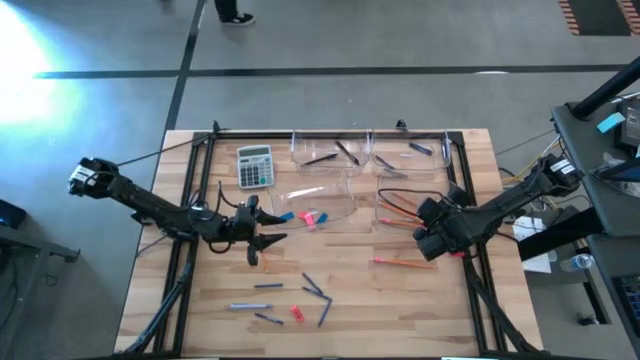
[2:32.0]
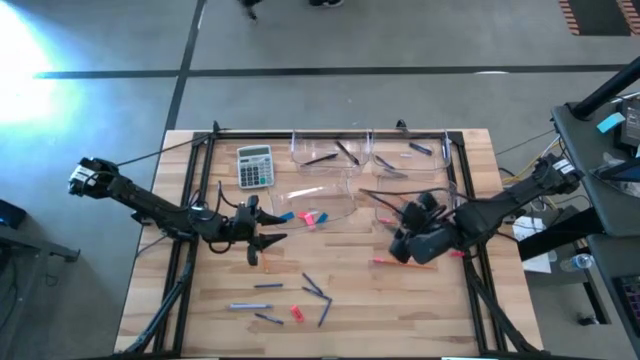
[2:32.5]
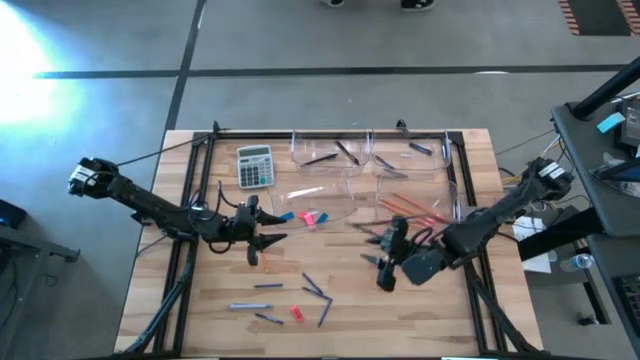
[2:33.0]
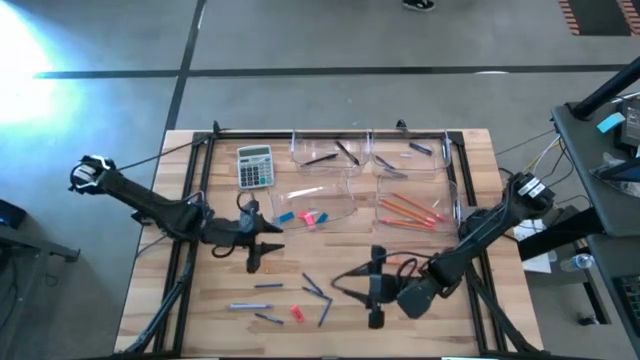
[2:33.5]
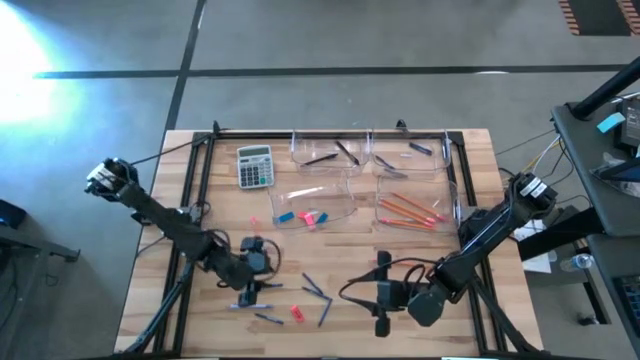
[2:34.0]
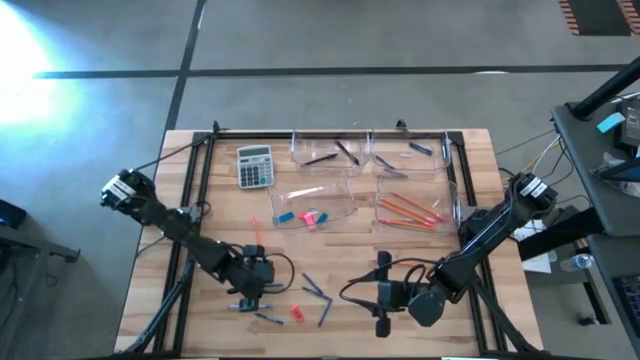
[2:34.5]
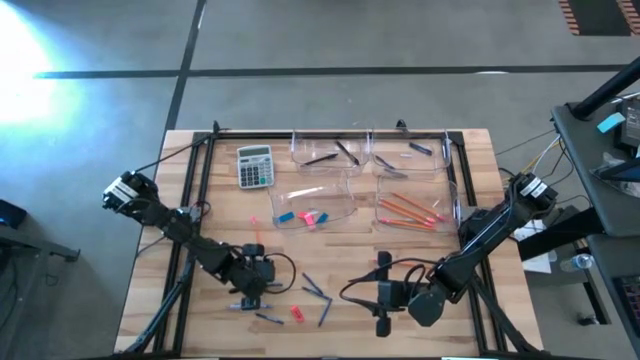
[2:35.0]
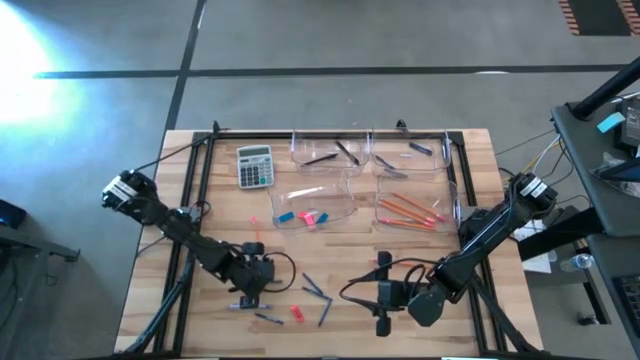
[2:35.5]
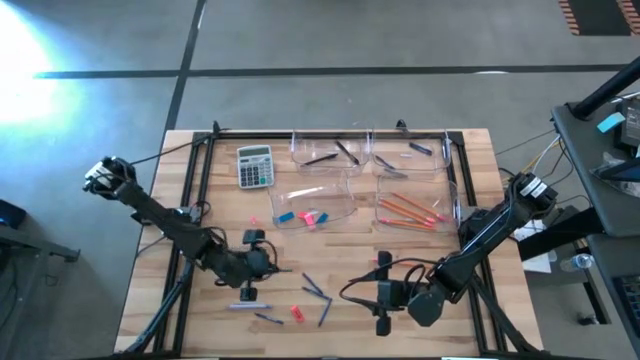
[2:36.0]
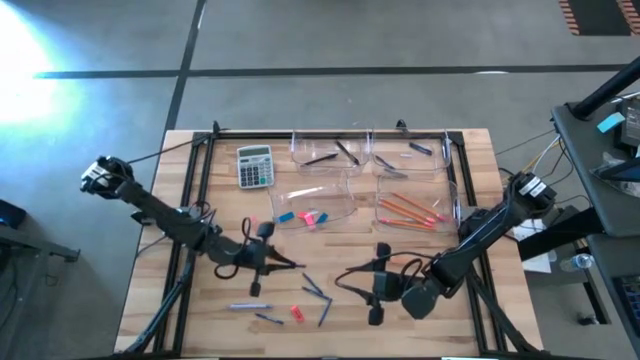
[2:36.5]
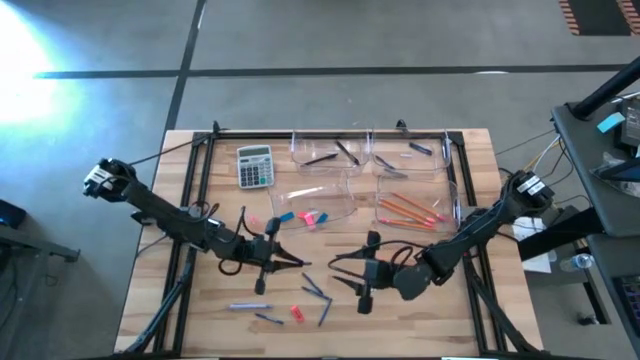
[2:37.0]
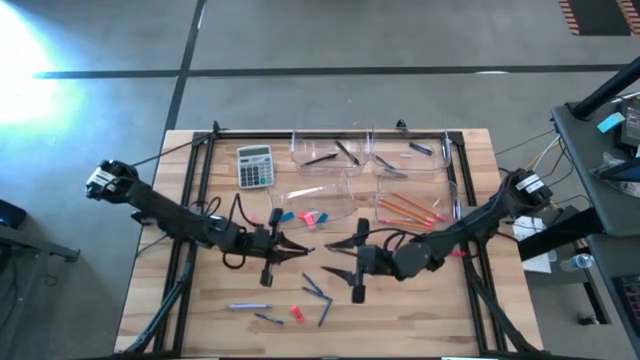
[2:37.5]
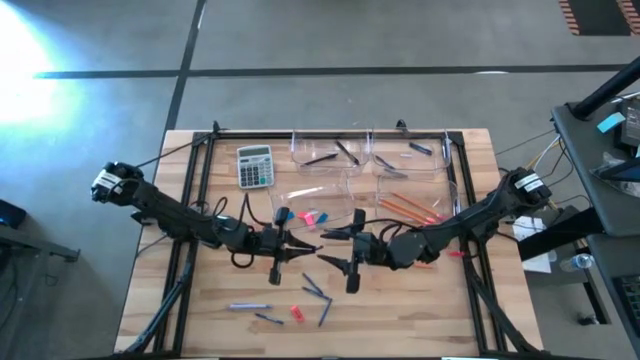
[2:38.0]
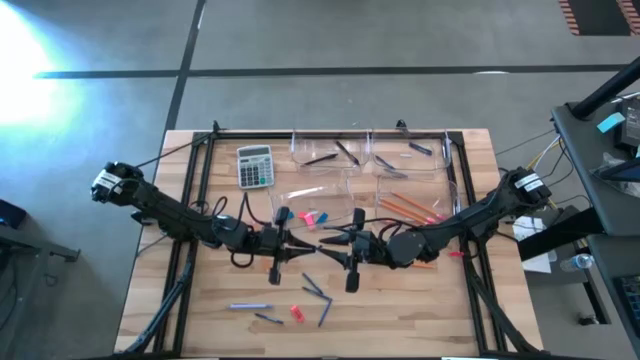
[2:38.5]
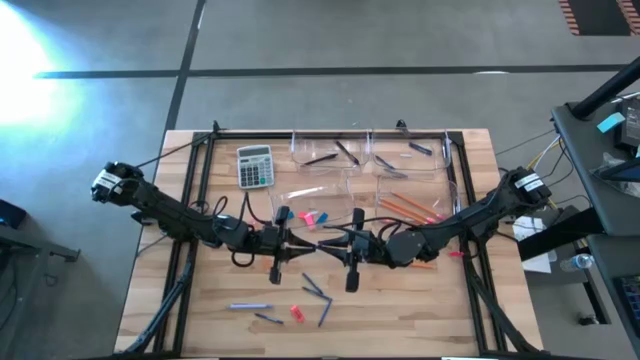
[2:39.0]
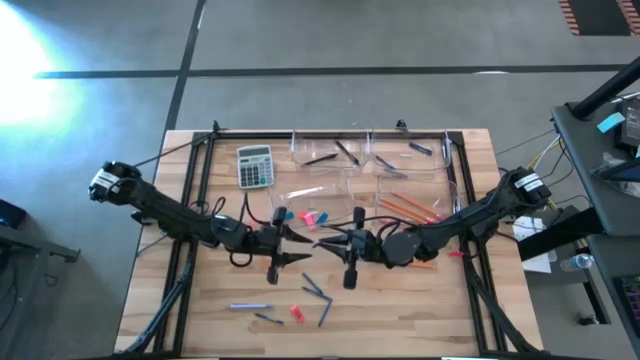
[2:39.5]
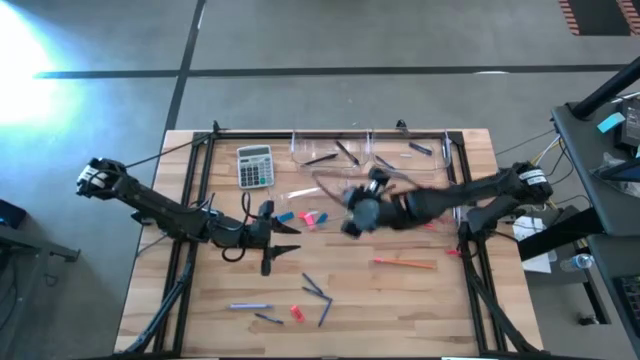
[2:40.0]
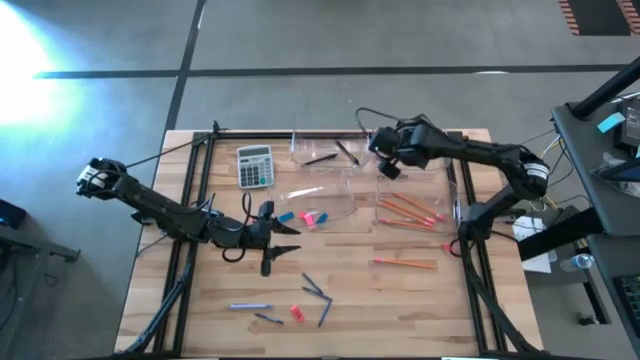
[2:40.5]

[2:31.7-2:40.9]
Task: Sort crayons/erasers/pens/pencils in bins
Put the blue crayon into the top right transparent bin

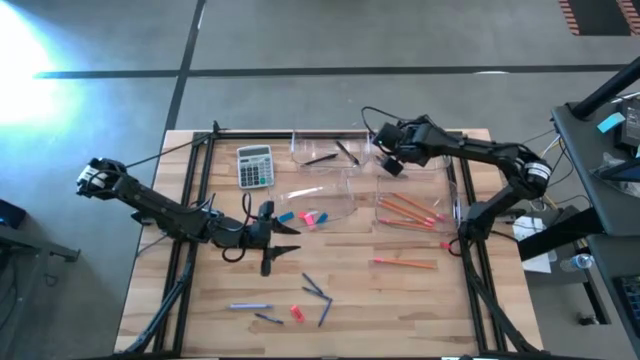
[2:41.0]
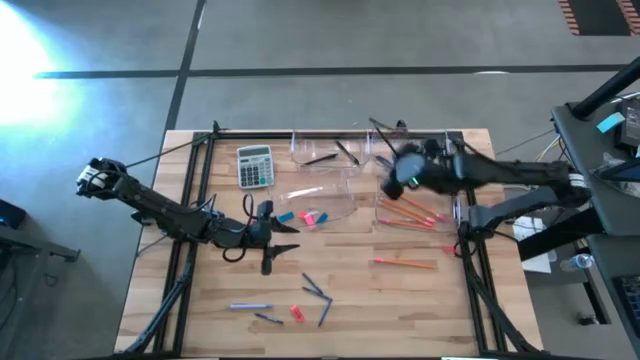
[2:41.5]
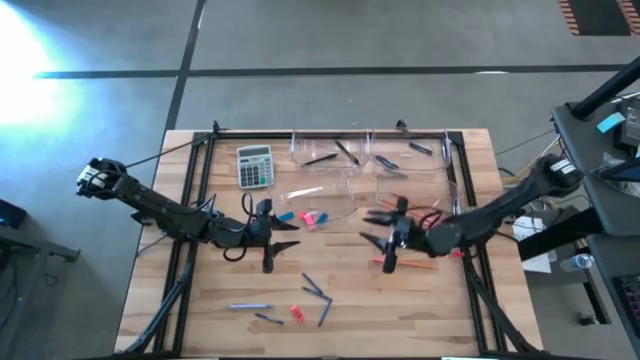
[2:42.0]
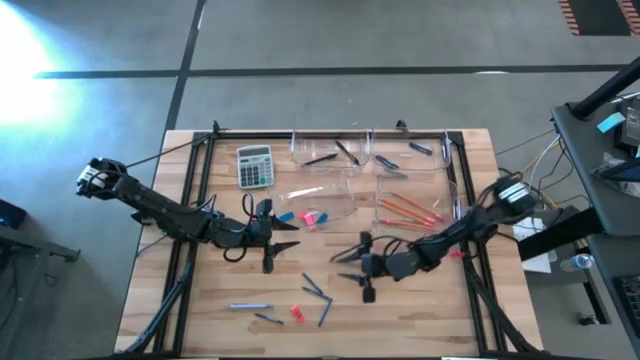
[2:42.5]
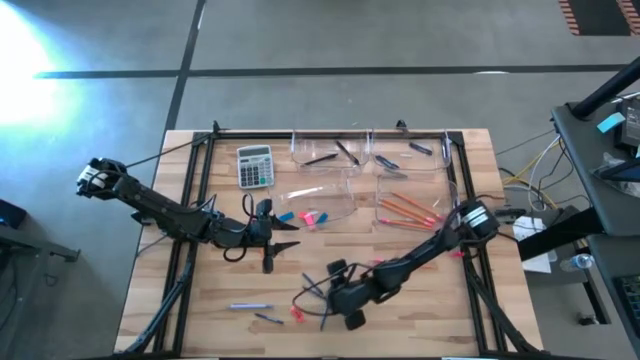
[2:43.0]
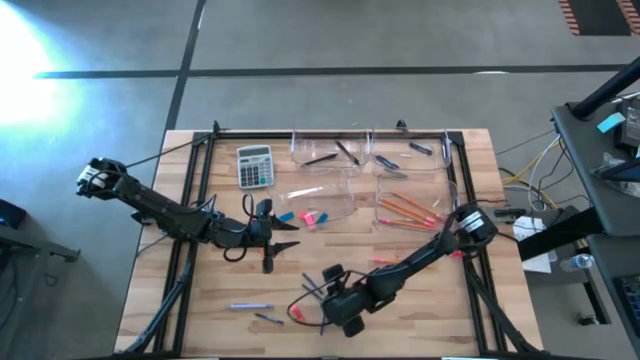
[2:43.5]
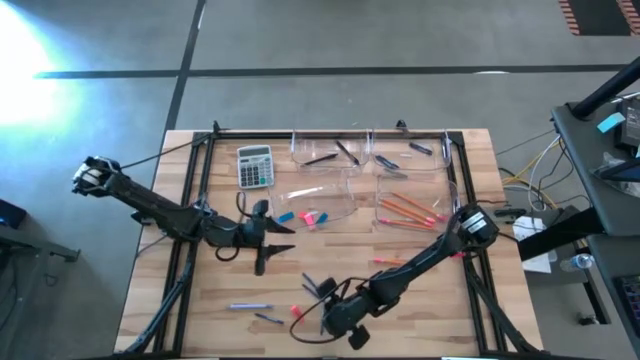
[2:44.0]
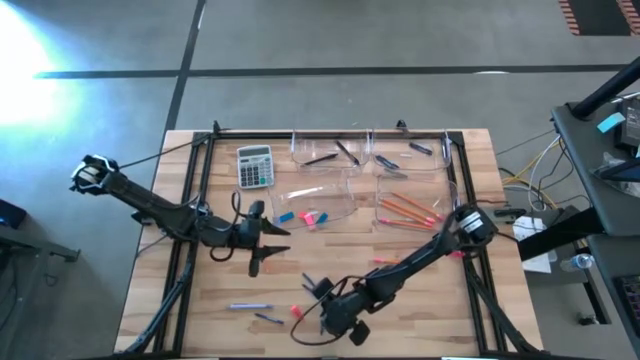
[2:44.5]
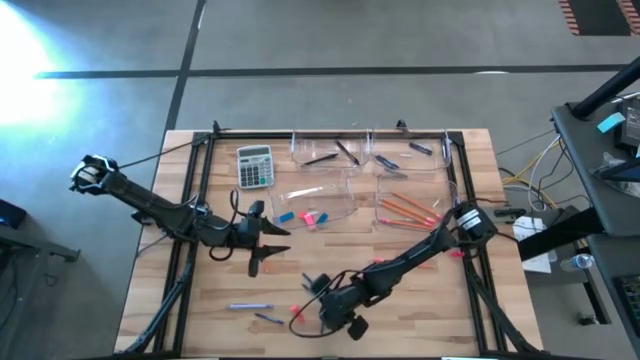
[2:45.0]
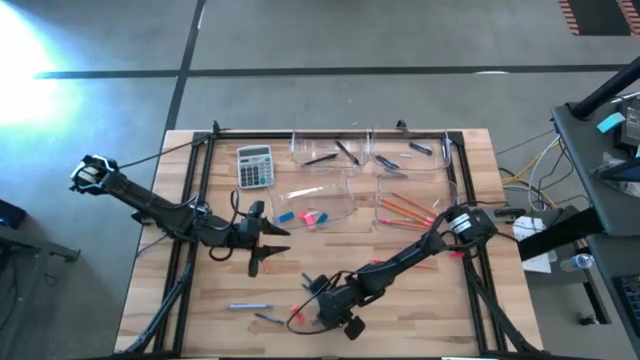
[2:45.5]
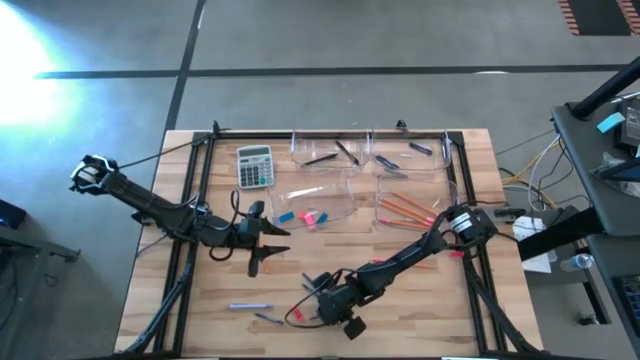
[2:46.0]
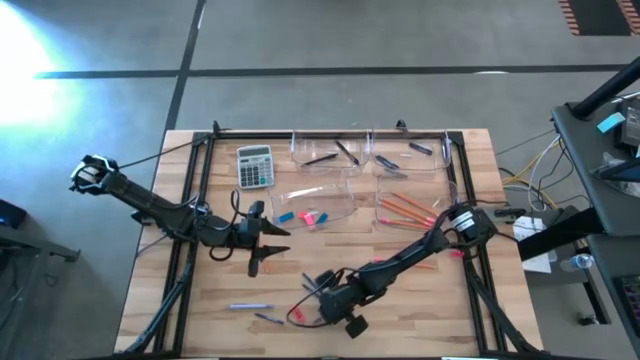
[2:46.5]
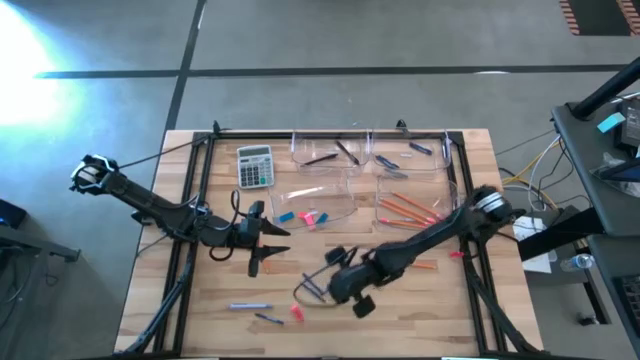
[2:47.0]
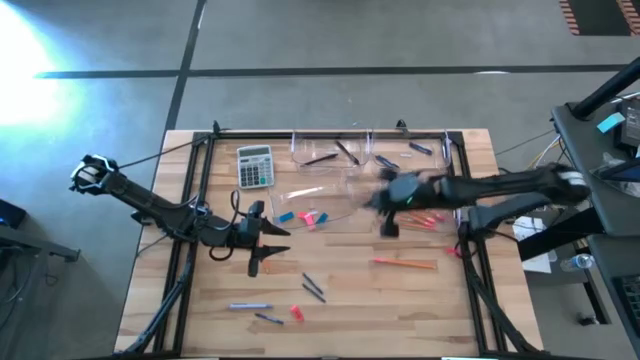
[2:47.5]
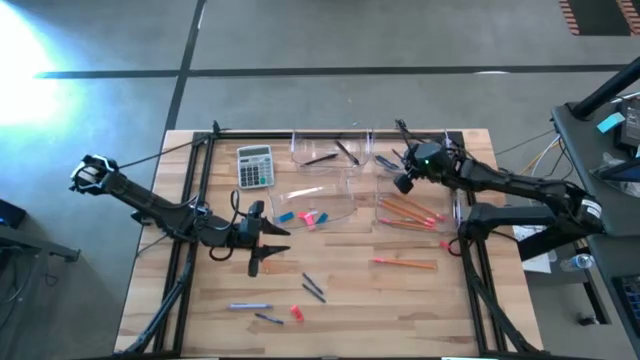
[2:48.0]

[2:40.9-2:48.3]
Put the blue crayon into the top right transparent bin

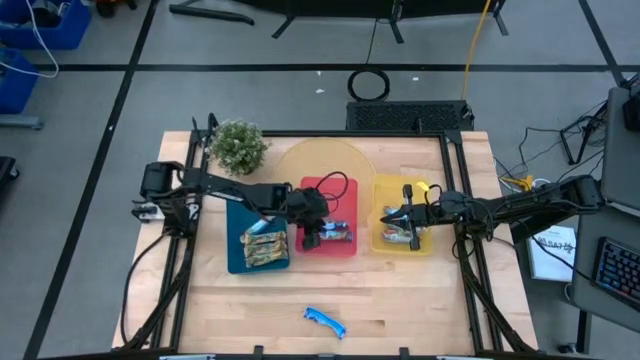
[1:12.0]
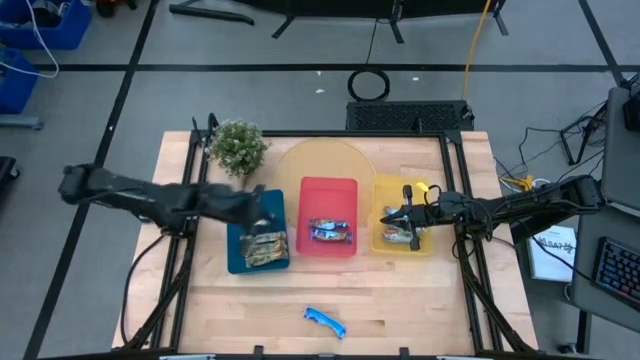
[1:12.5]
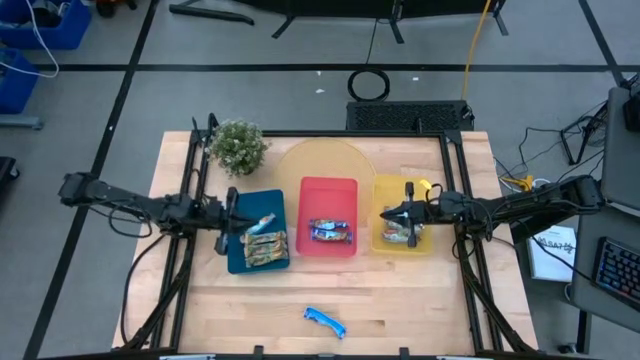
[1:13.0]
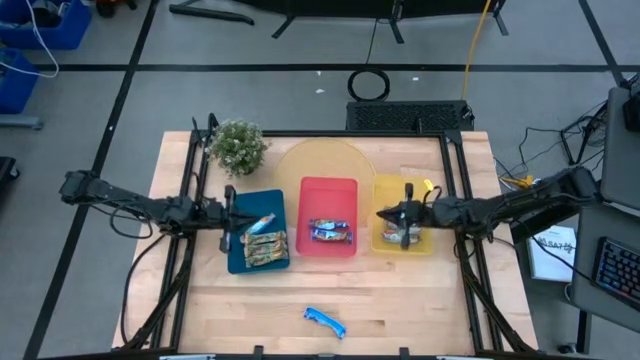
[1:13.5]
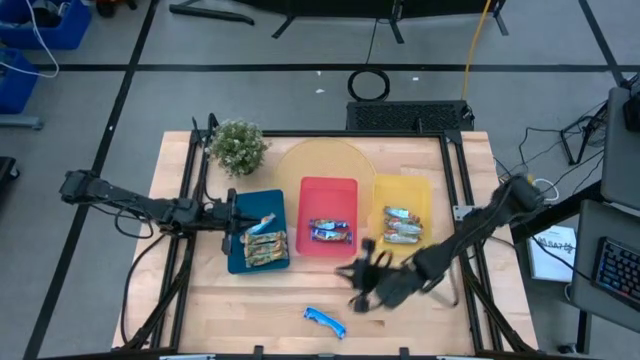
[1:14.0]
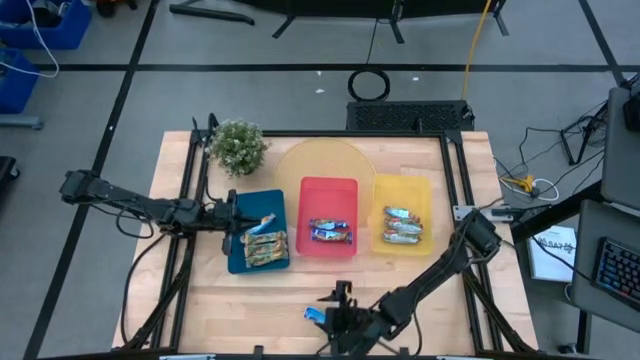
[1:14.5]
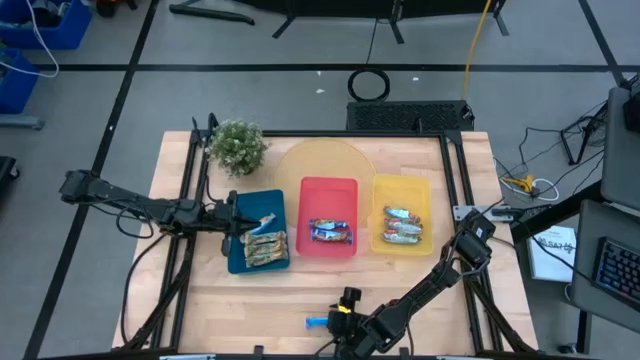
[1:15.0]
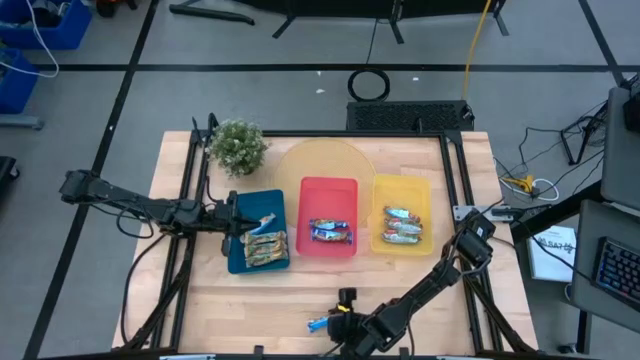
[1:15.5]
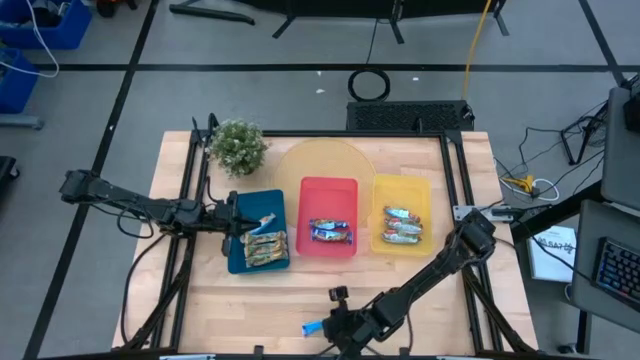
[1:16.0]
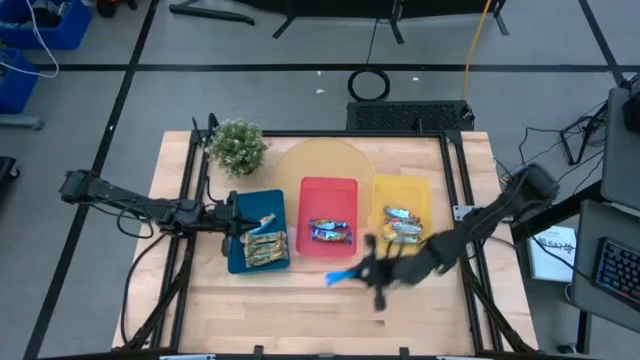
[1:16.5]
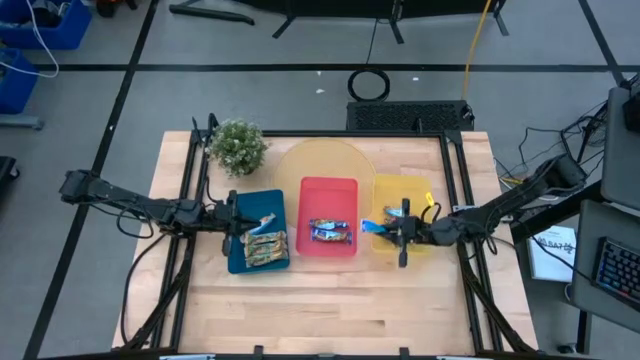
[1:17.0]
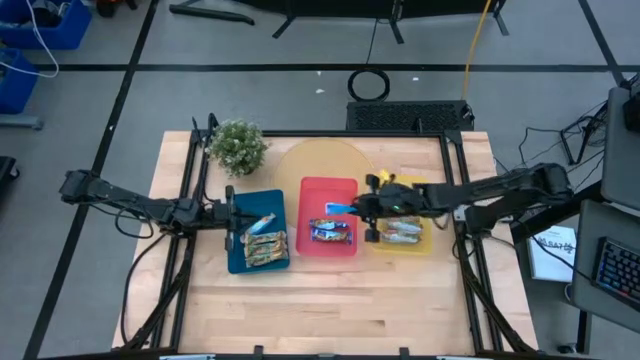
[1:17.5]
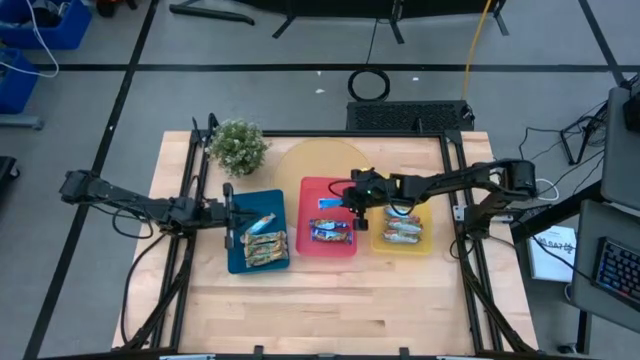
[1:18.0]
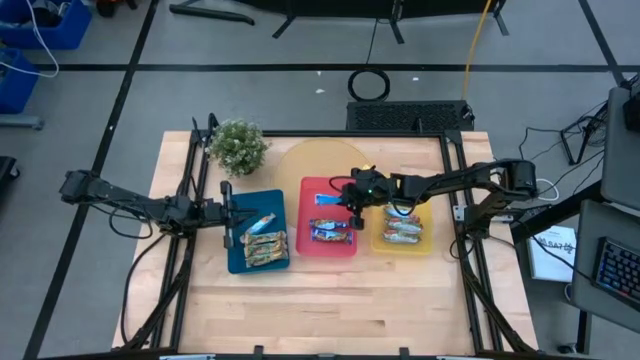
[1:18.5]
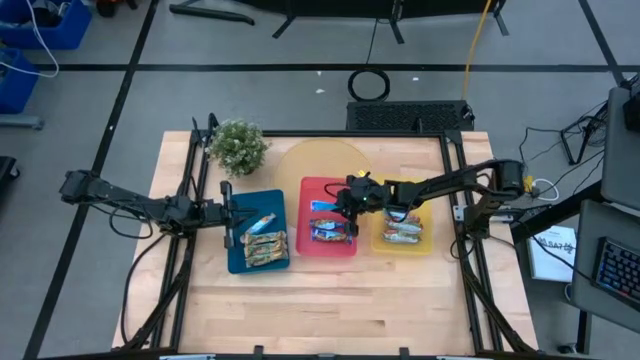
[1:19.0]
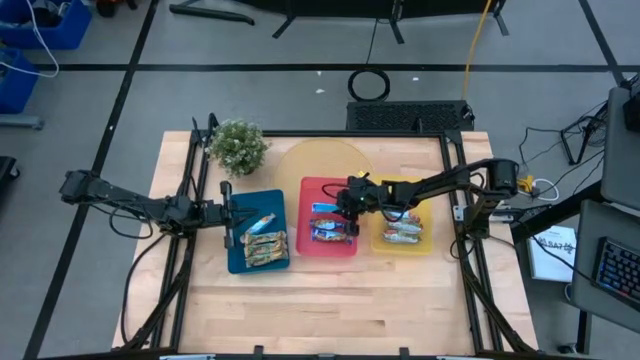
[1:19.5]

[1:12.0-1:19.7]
Task: Pick and place Granola Bars by type
Put the blue granola bar into the red bin
